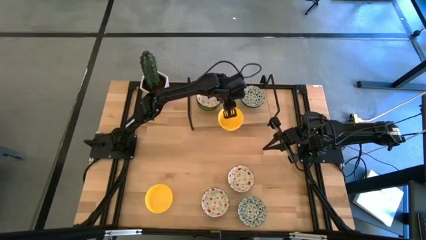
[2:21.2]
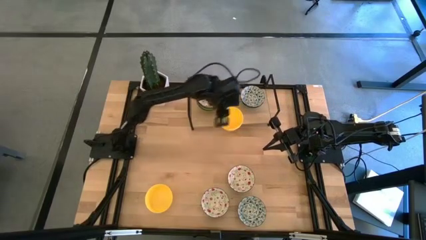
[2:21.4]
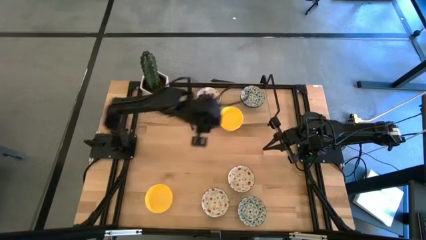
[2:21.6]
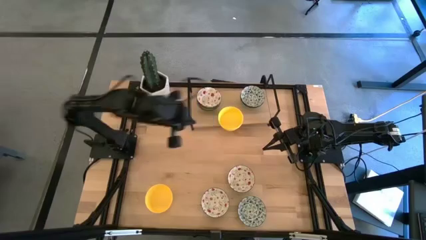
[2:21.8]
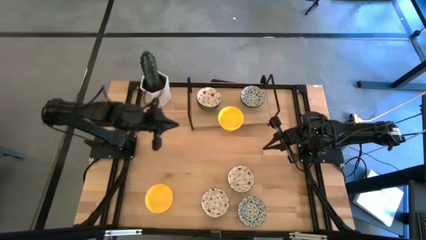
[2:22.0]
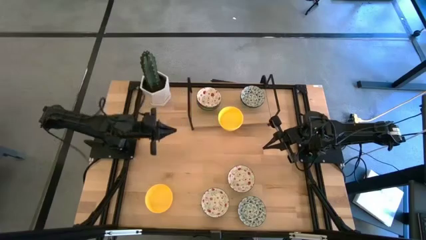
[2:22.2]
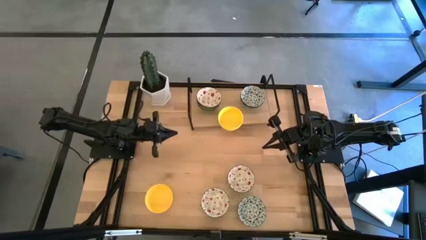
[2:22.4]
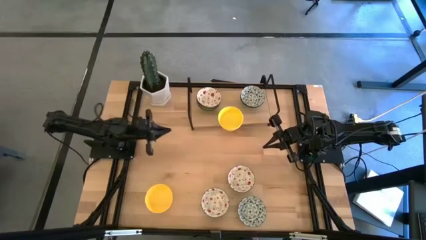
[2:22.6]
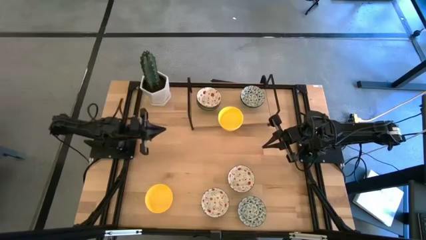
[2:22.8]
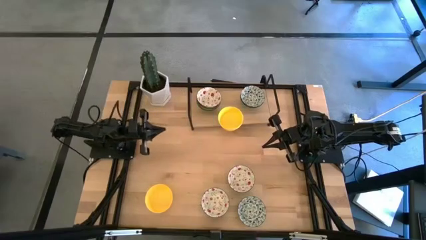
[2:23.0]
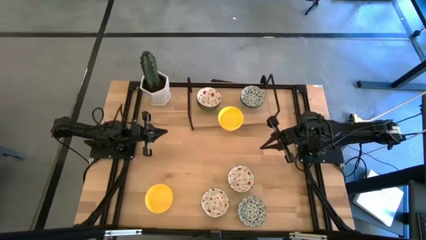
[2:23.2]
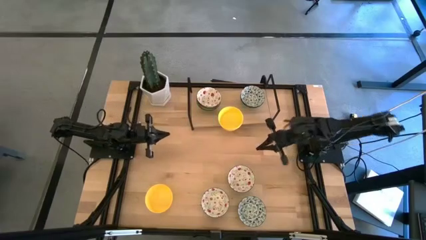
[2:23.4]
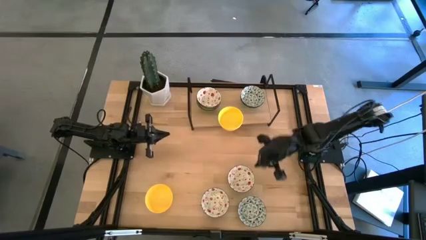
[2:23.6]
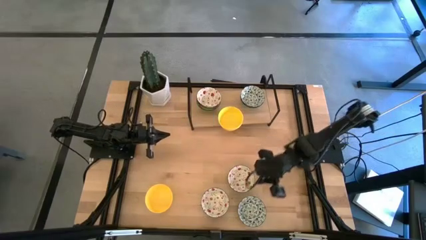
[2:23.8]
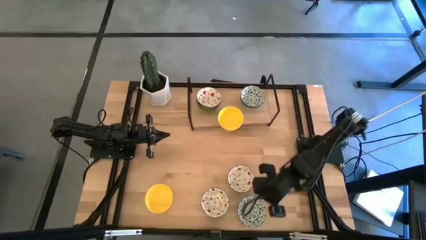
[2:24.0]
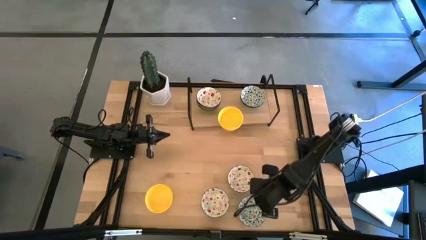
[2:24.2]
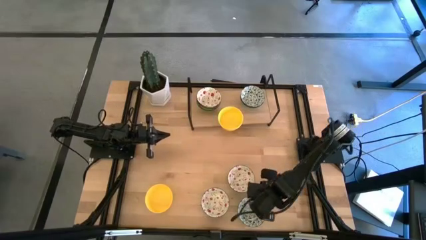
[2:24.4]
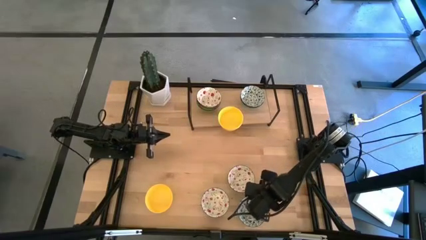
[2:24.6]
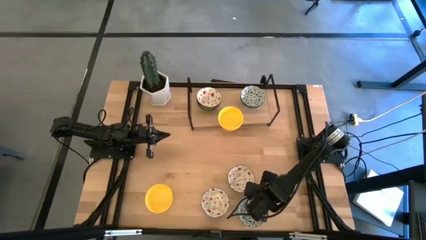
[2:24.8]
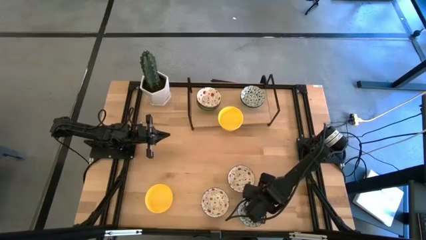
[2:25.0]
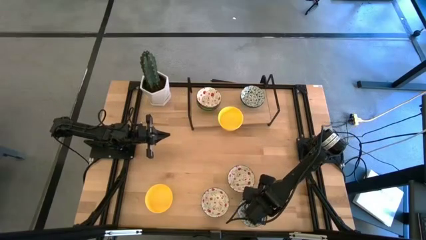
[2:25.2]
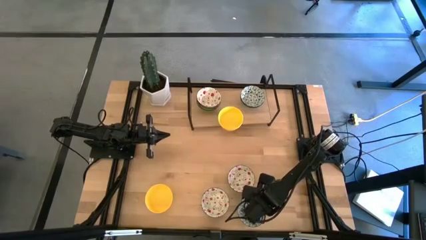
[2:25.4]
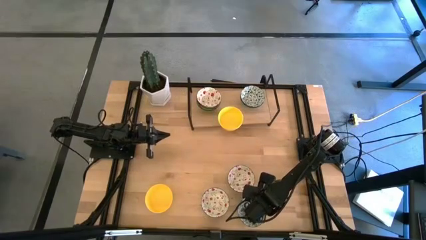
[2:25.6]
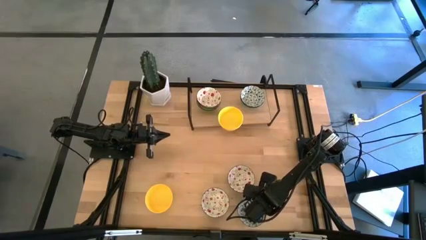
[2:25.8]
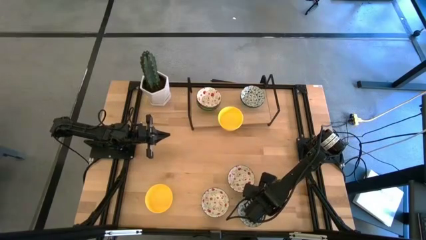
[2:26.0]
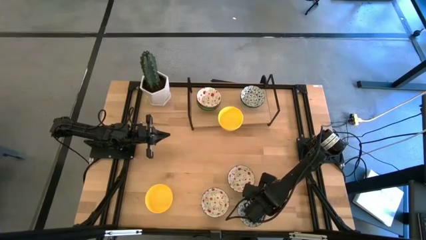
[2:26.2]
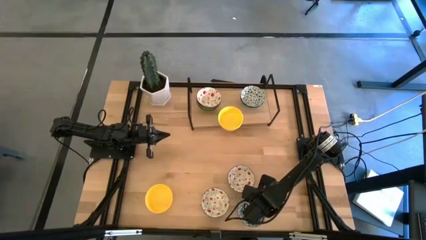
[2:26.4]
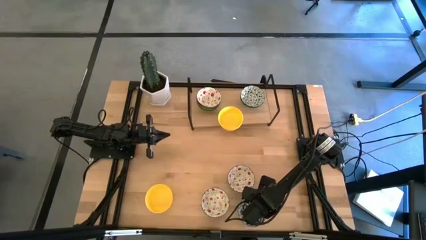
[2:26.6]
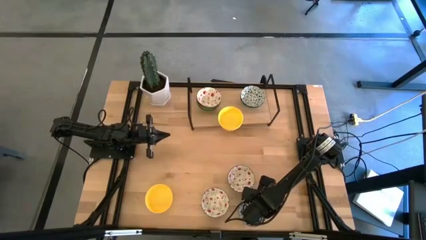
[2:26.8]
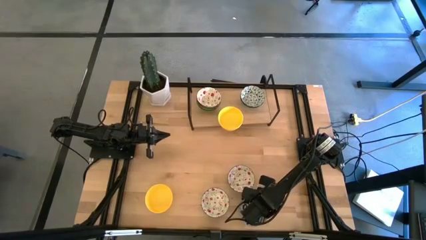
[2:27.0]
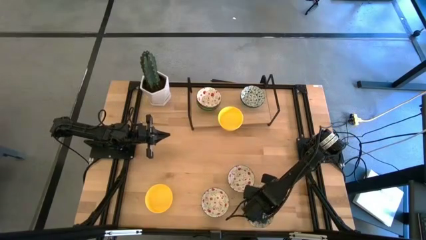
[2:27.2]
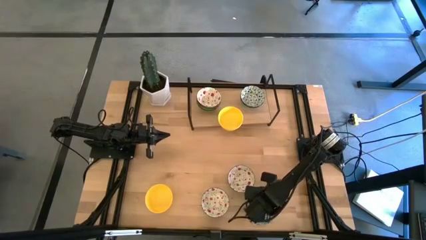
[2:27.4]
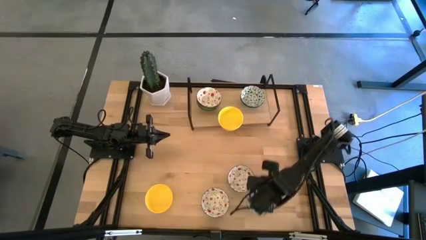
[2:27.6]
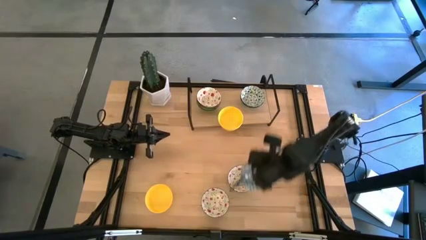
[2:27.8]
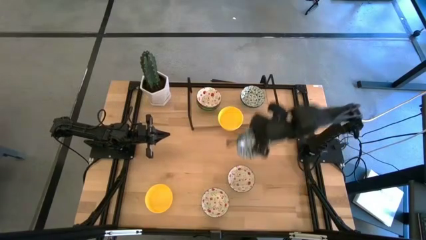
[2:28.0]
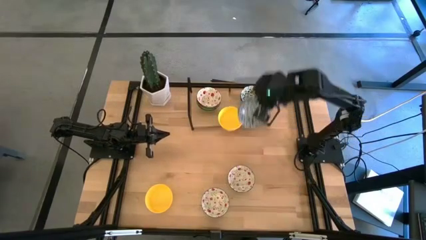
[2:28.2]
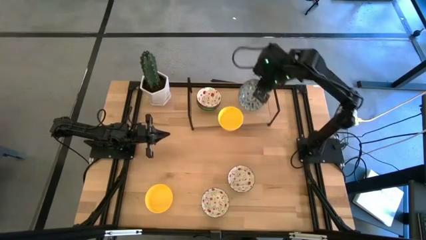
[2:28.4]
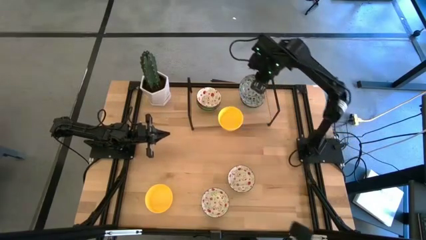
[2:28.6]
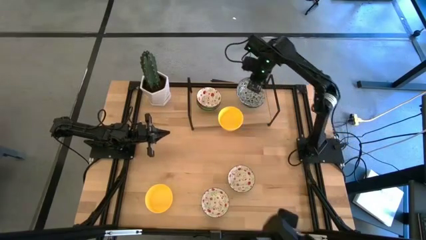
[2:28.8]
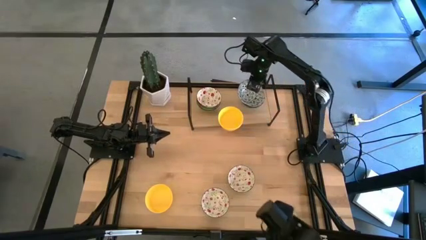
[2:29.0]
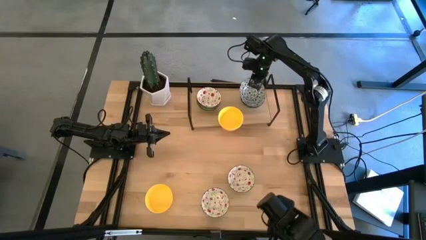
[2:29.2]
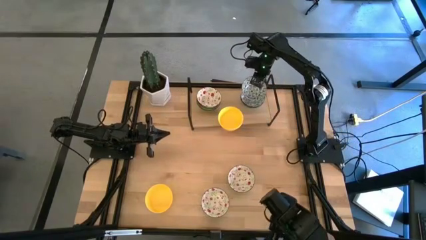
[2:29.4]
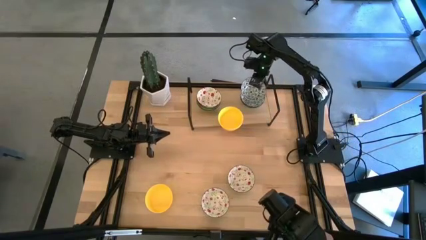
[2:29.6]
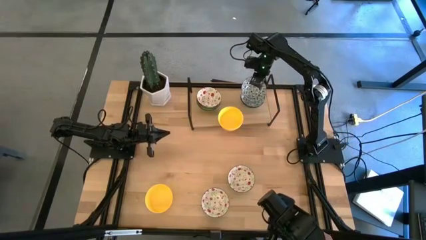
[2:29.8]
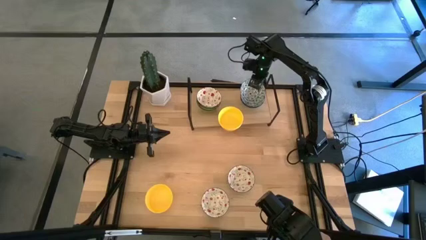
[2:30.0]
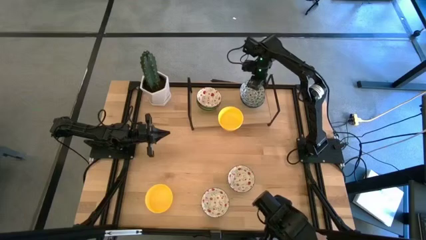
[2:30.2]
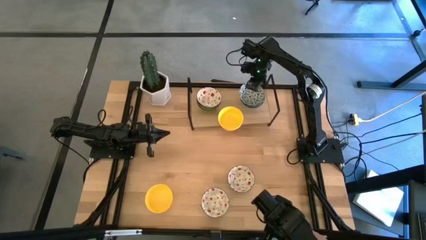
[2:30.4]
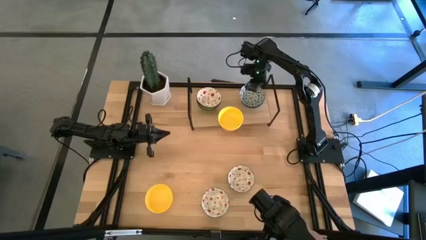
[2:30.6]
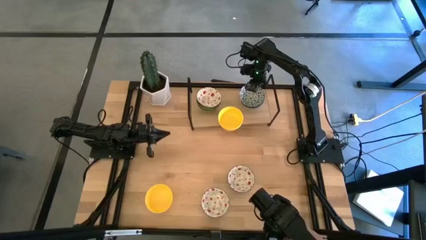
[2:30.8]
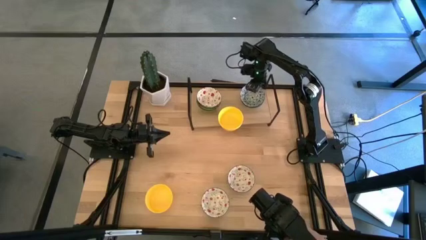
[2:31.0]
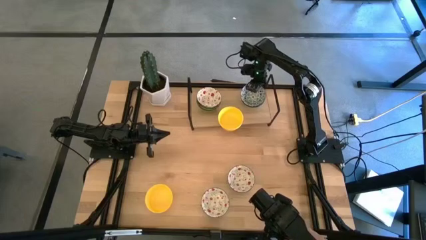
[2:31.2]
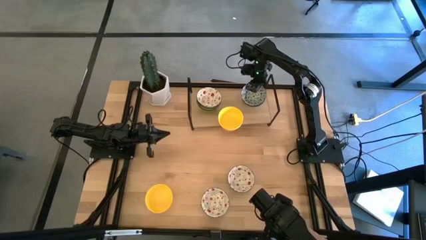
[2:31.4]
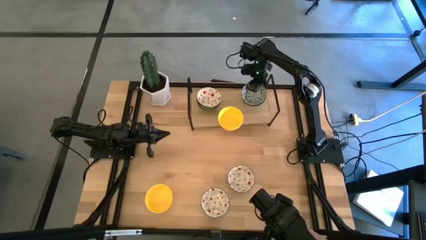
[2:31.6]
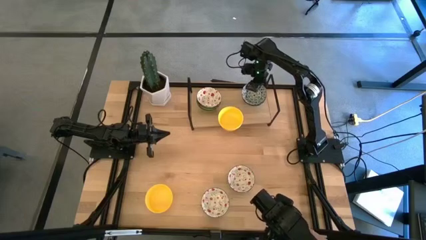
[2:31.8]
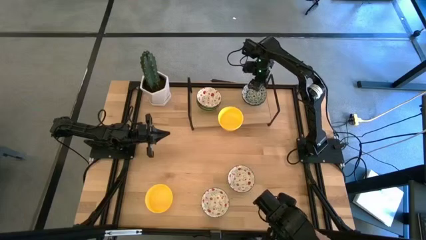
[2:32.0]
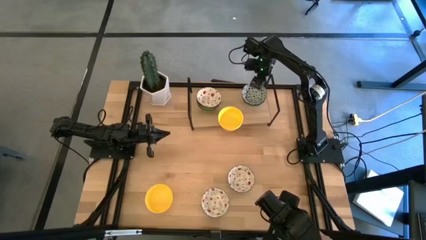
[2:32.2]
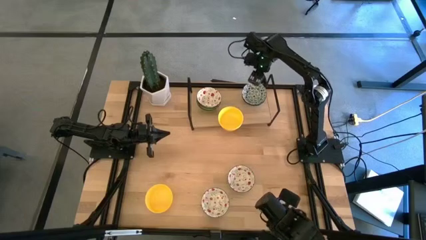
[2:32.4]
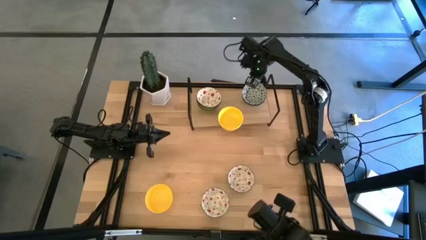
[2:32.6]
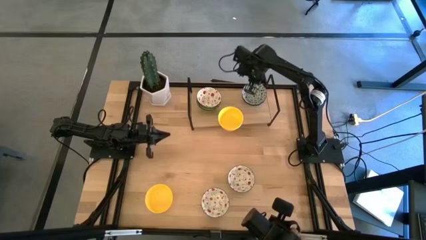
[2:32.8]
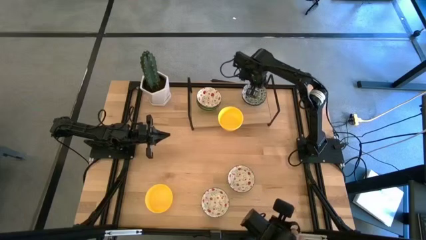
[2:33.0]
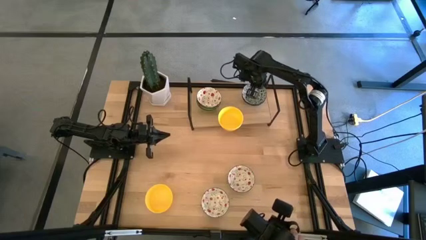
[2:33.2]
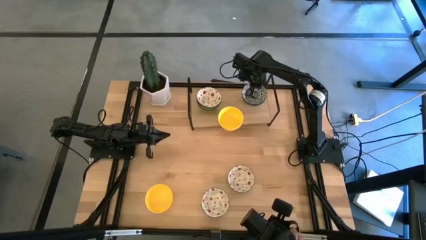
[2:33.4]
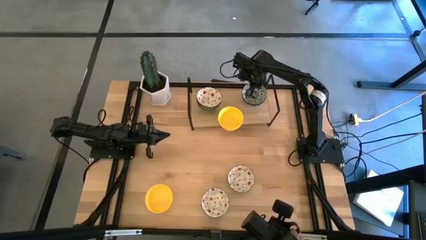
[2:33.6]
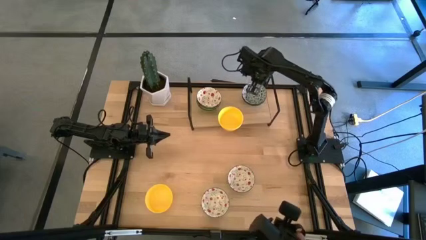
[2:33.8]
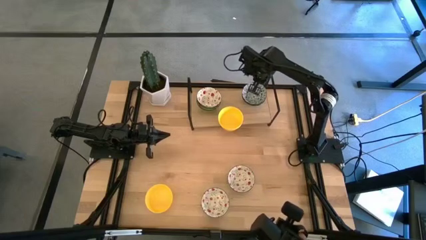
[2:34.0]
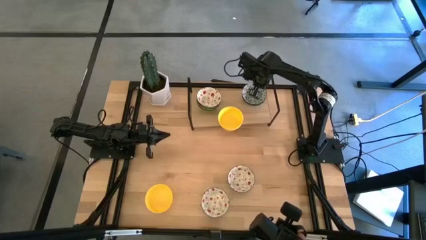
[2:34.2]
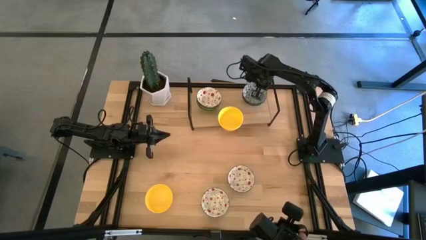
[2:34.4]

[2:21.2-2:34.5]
Task: Pick & Place Mini bowls
Stack the blue patterned bowl on top of the blue patterned bowl on the shelf
